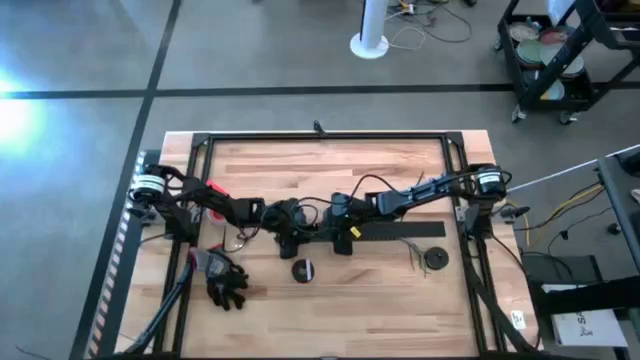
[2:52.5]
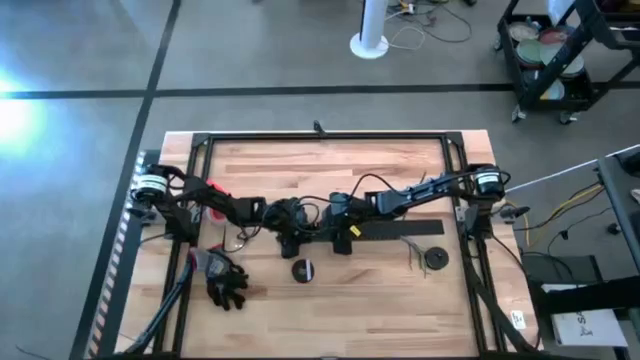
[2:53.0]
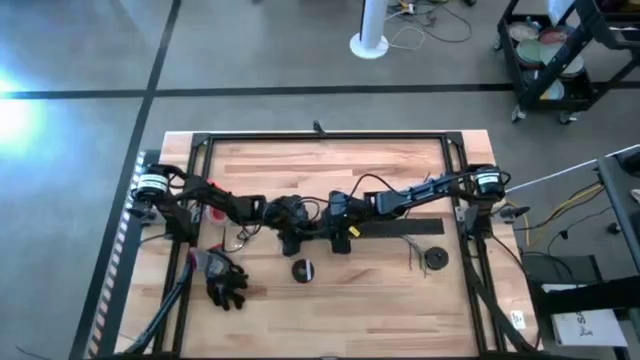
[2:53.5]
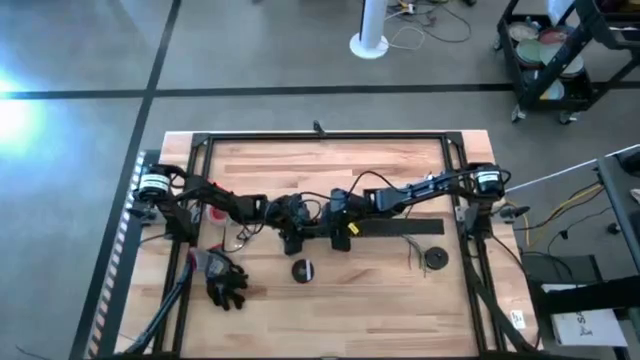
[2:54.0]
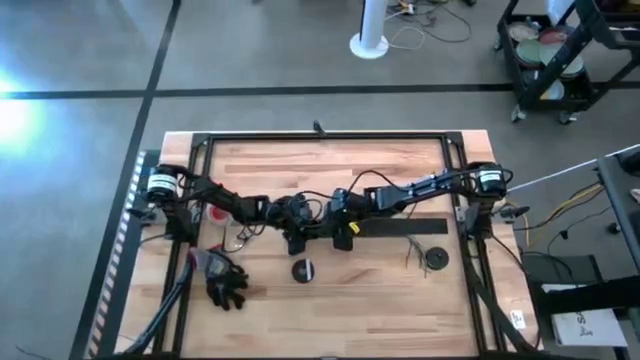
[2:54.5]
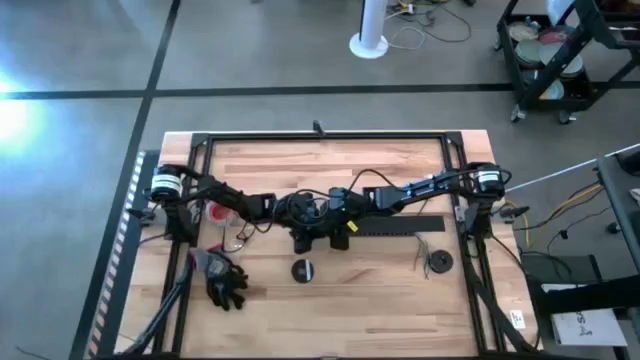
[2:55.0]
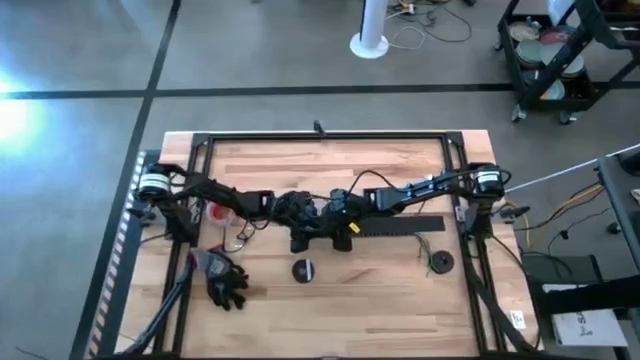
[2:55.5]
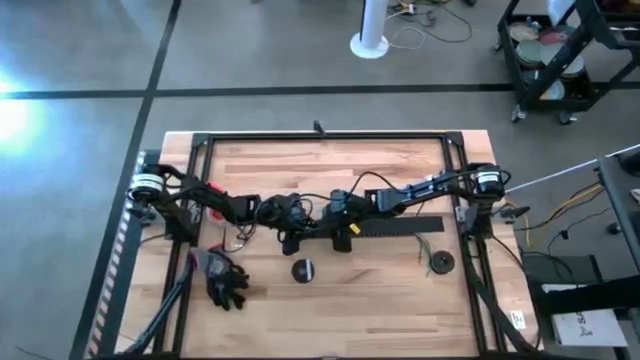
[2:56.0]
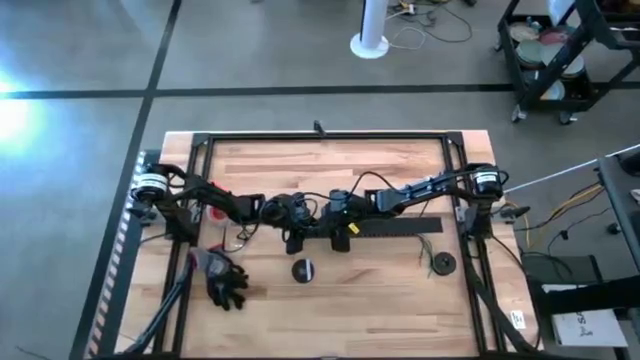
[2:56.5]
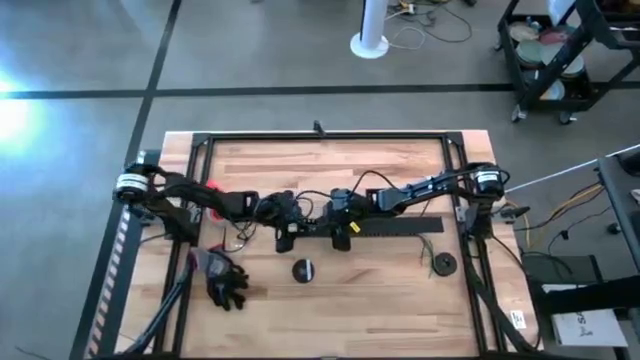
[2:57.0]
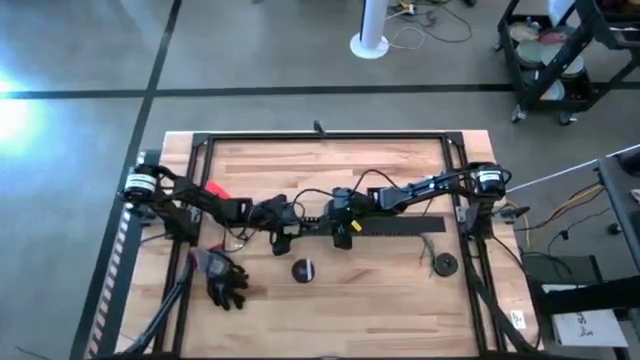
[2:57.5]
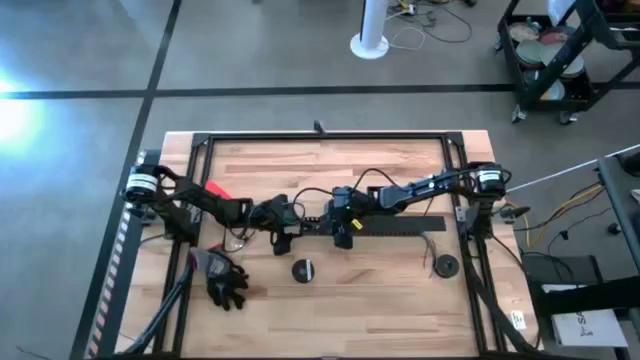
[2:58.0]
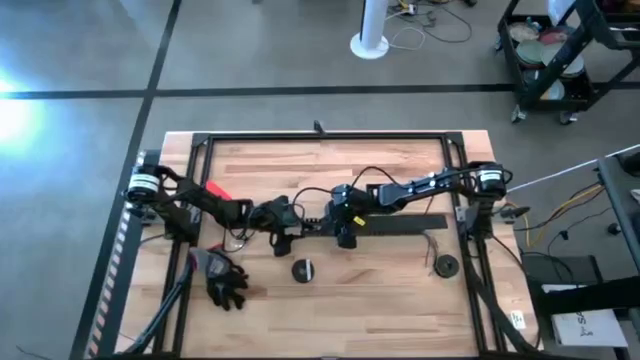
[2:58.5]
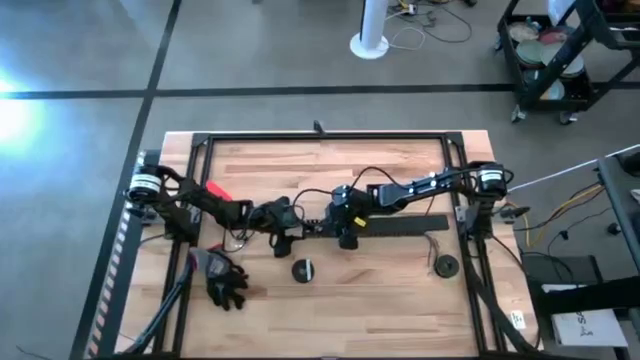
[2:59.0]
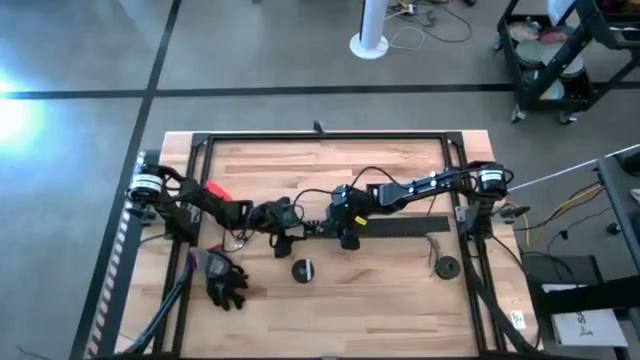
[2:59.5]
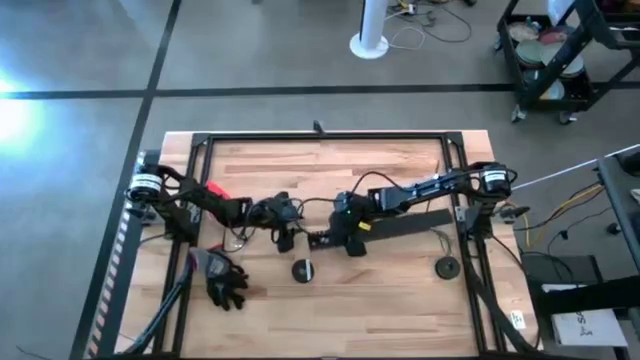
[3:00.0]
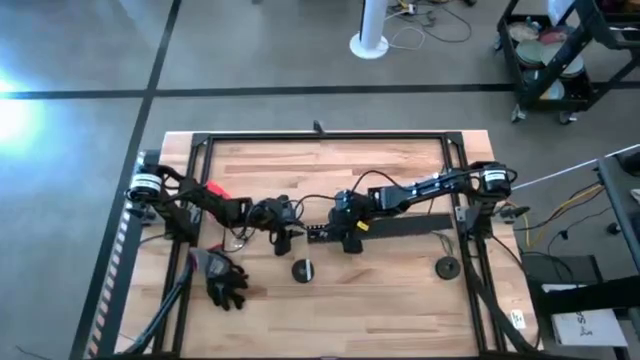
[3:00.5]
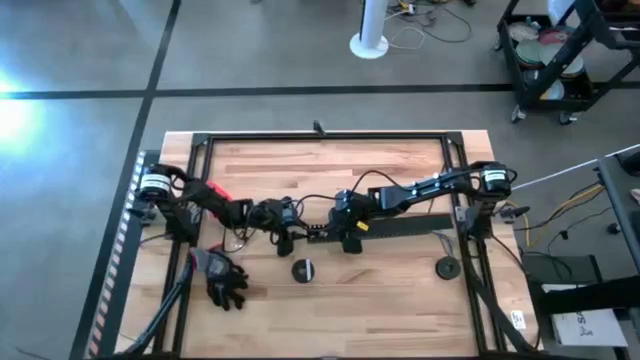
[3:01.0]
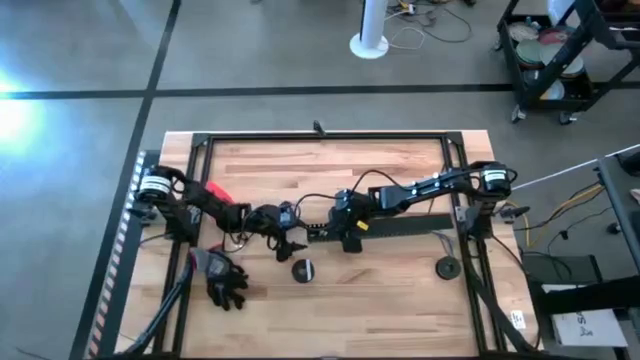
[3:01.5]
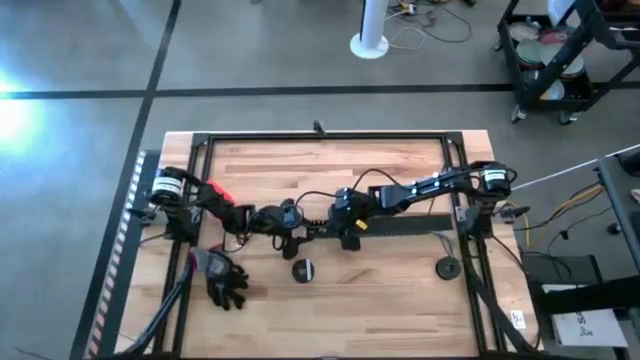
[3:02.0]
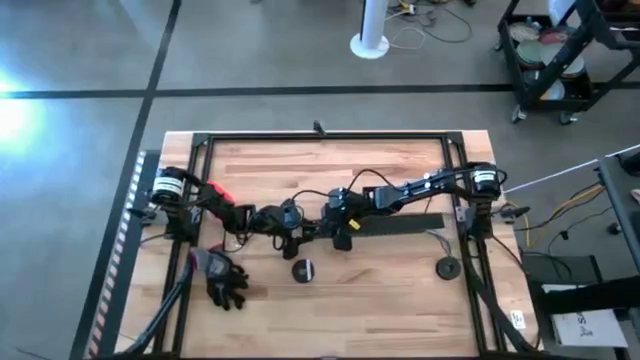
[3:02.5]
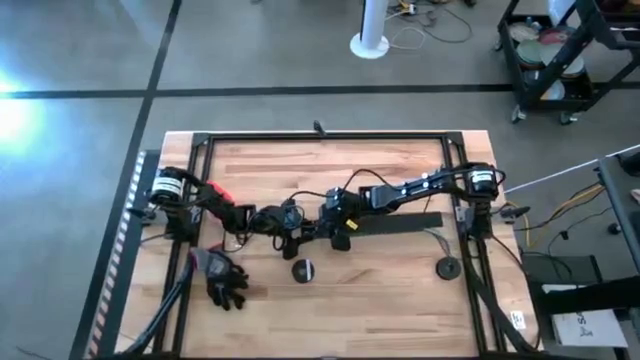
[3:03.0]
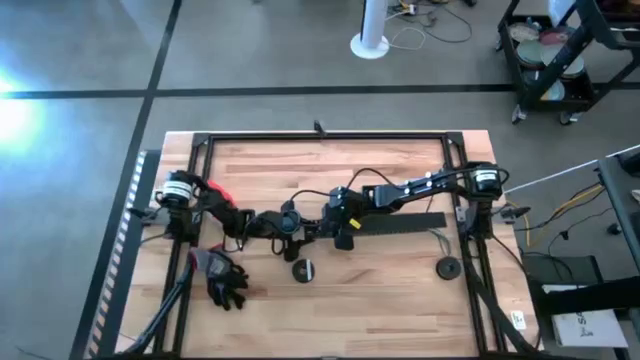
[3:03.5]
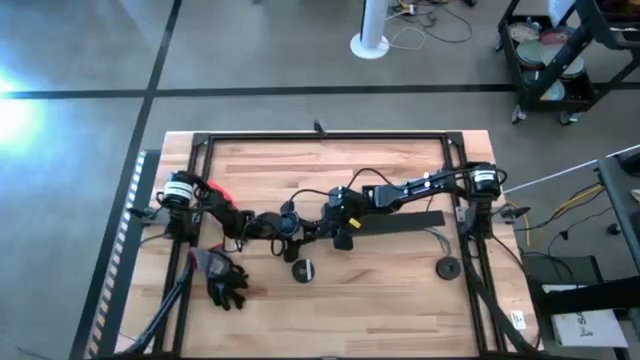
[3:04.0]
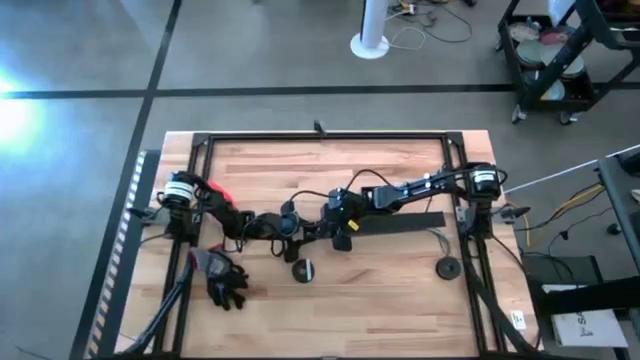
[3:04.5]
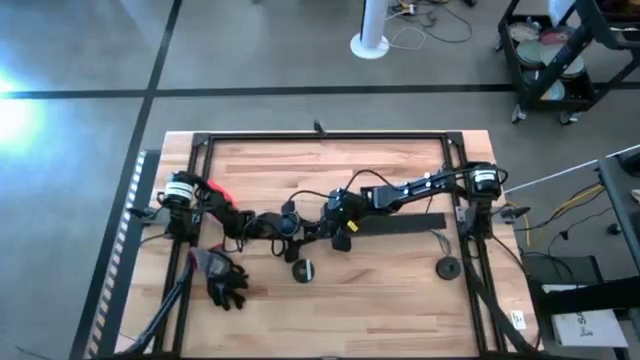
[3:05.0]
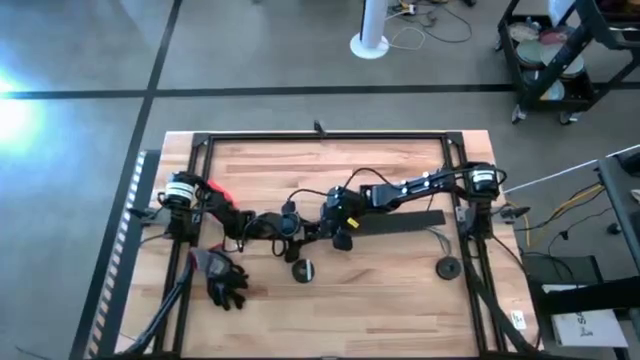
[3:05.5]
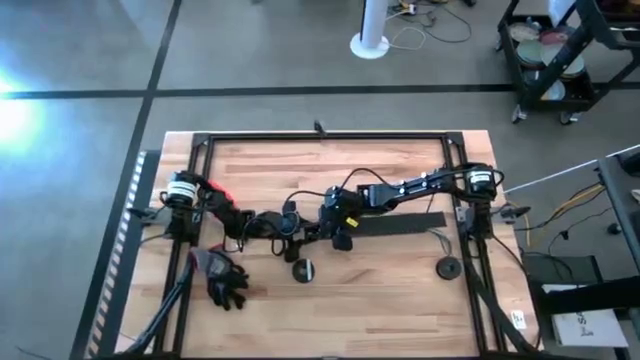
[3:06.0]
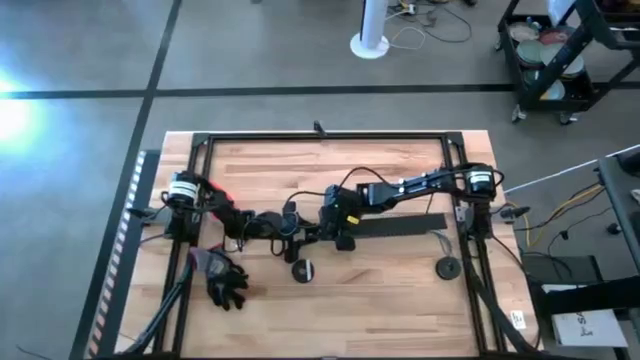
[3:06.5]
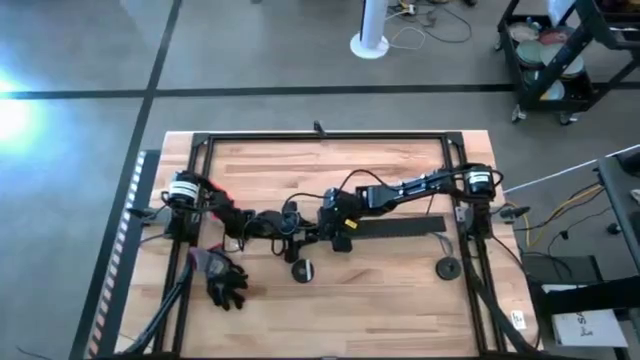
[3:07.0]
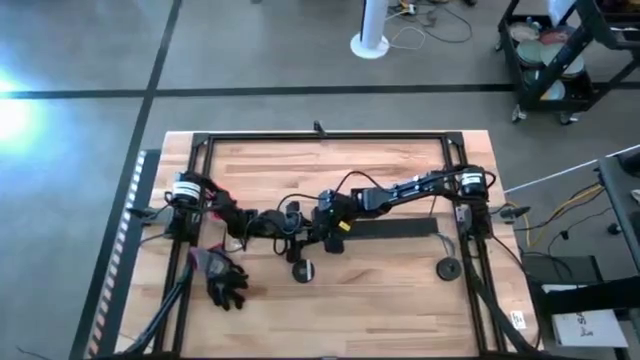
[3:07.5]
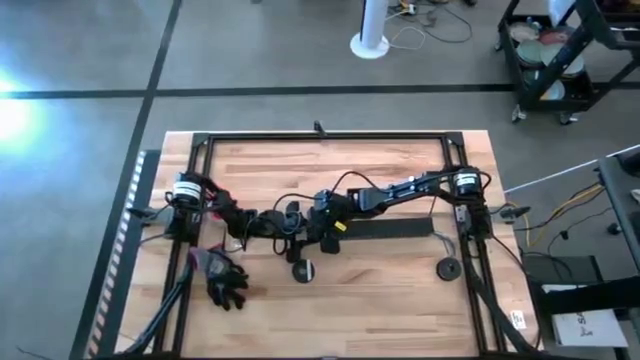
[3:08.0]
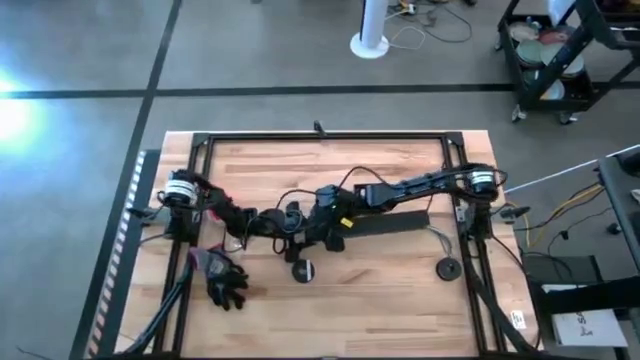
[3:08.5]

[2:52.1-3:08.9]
Task: Ziptie cables
Close the black cable duct

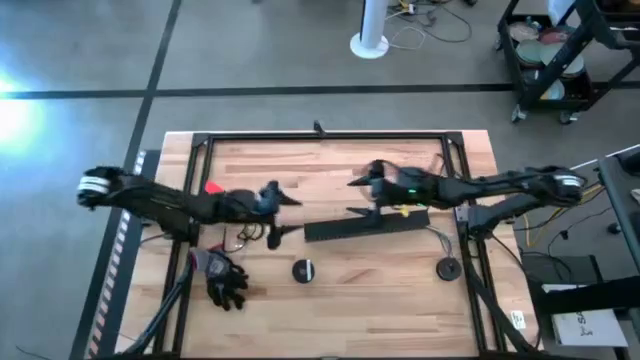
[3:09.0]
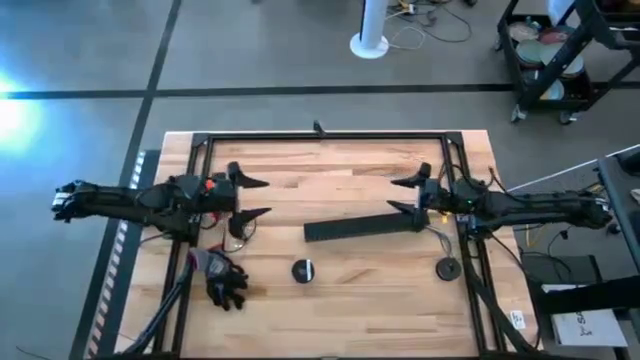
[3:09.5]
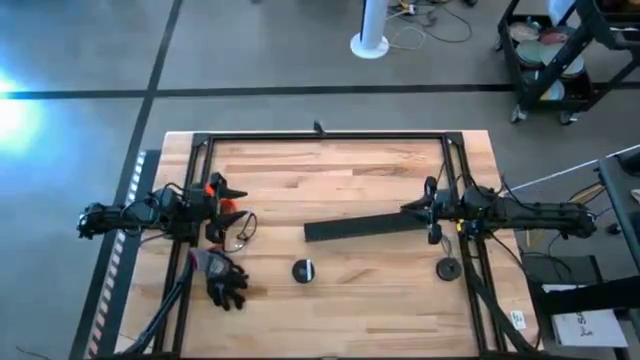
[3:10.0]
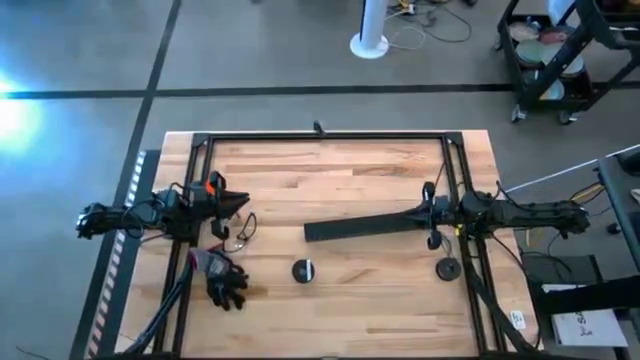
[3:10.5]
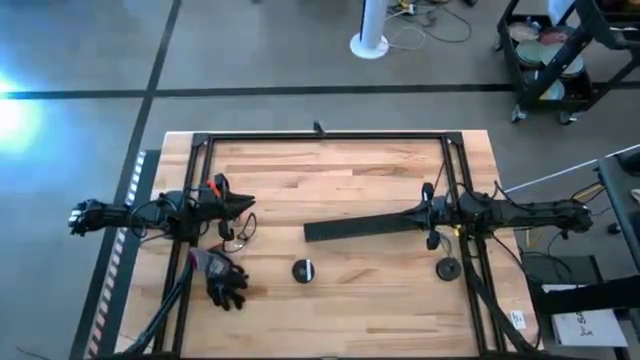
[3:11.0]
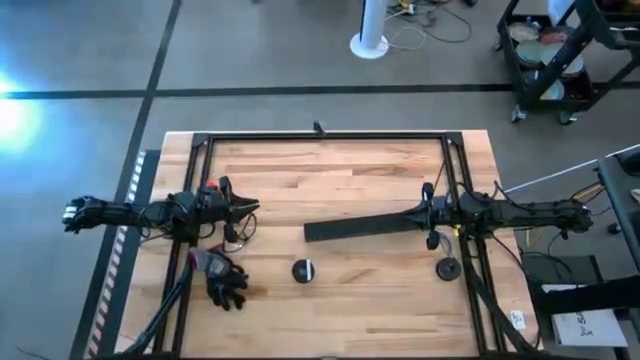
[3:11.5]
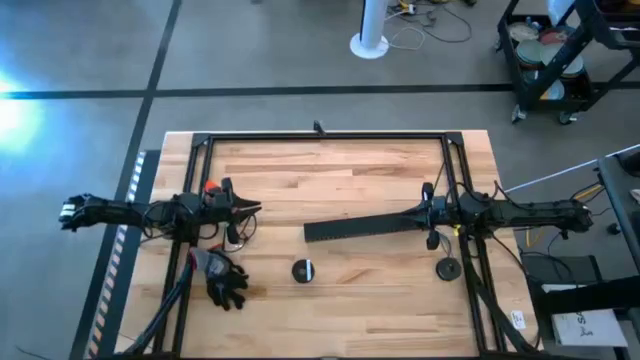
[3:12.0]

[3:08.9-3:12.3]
Return to Home Position

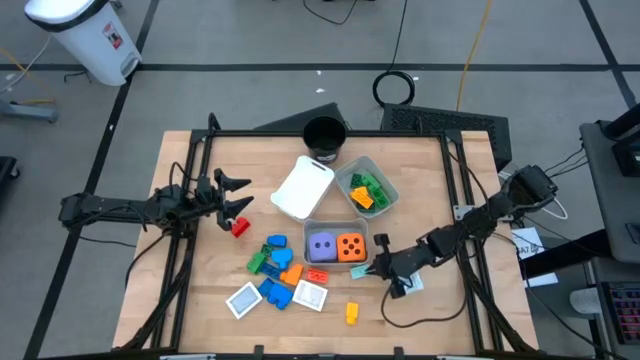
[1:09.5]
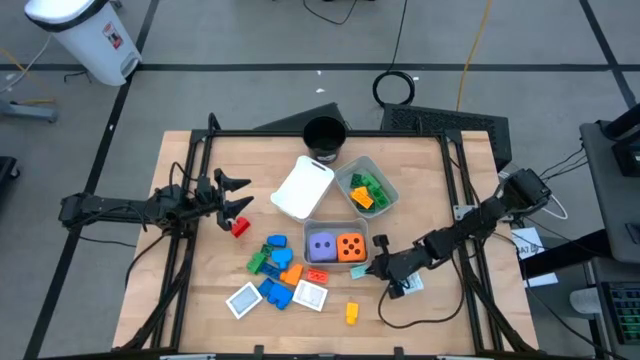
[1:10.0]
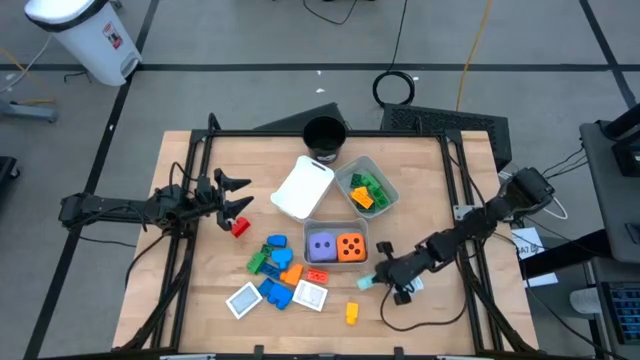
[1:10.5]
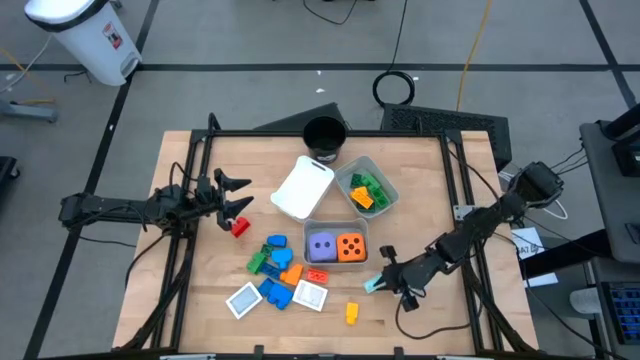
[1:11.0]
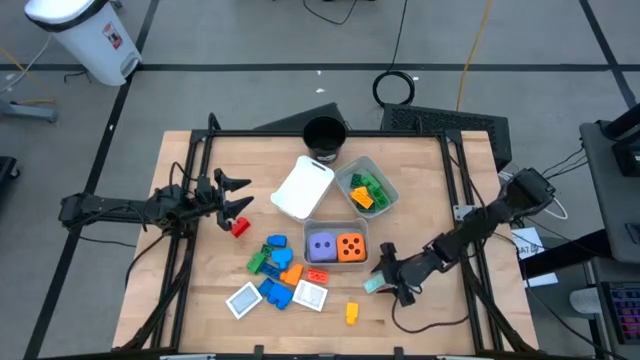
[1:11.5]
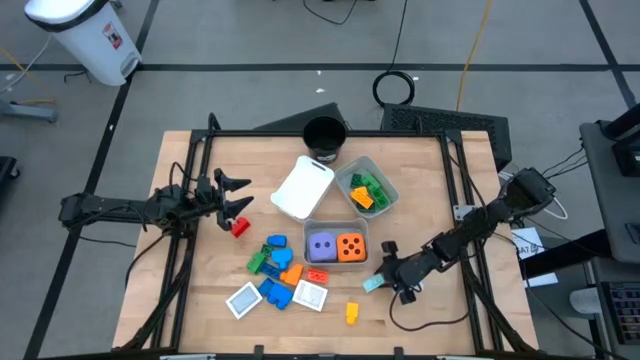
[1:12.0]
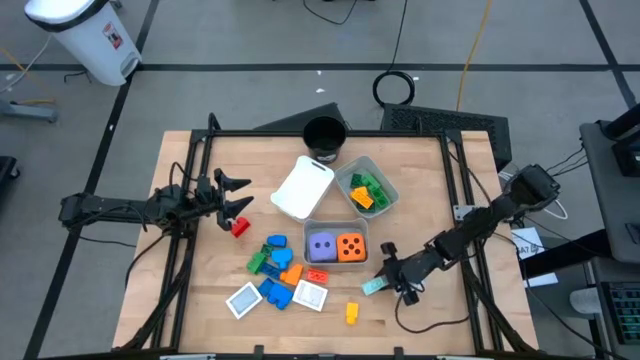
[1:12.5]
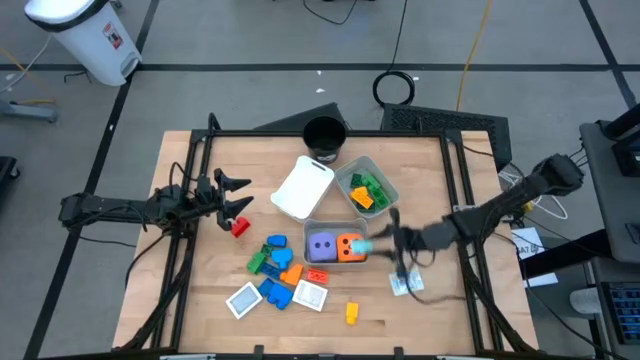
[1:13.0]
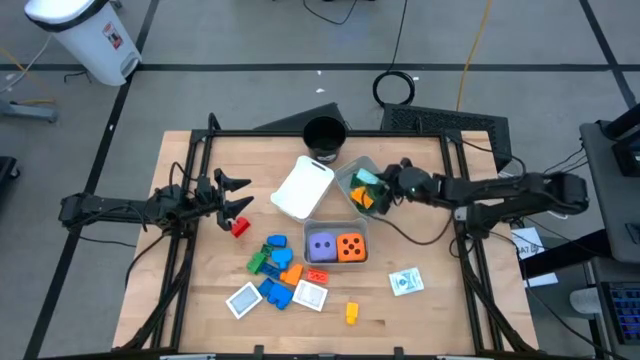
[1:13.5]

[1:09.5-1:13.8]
Task: Pick & Place Toys
Put the light blue game piece into the top gray bin
